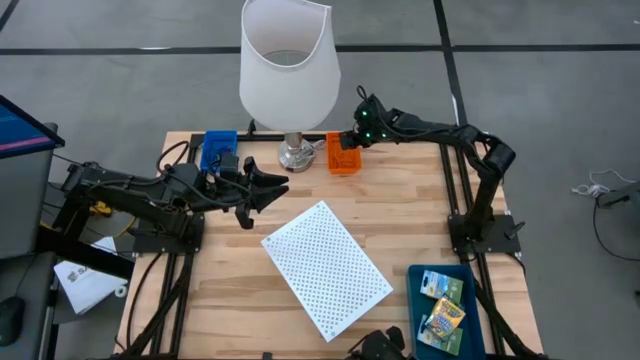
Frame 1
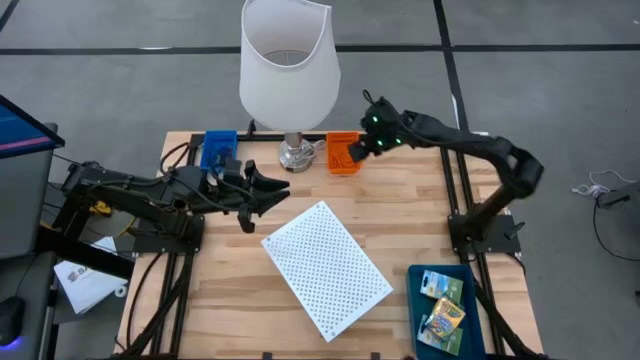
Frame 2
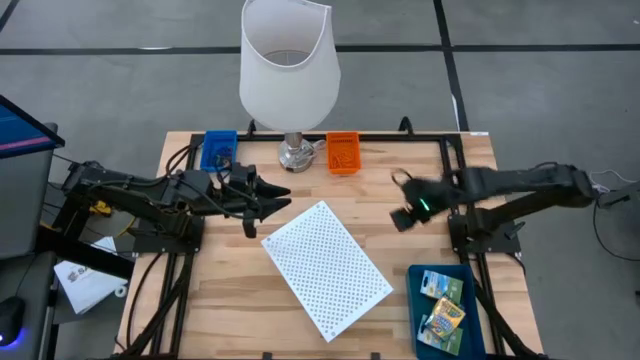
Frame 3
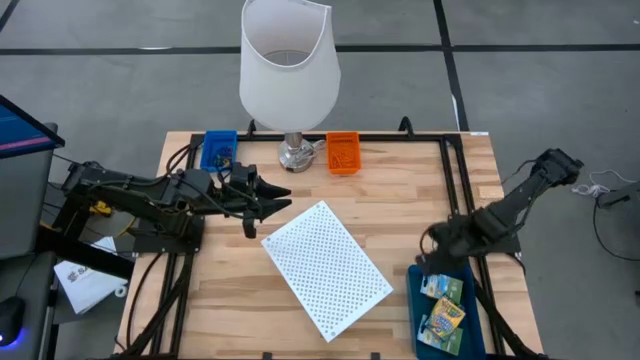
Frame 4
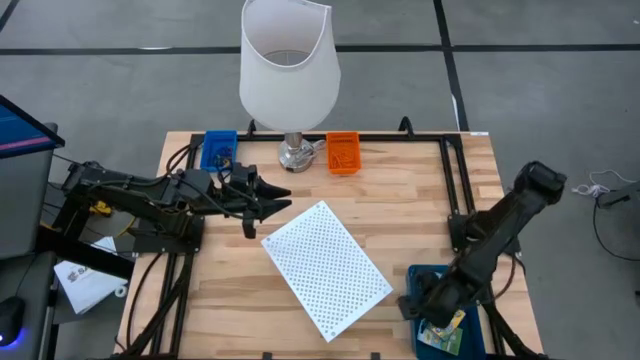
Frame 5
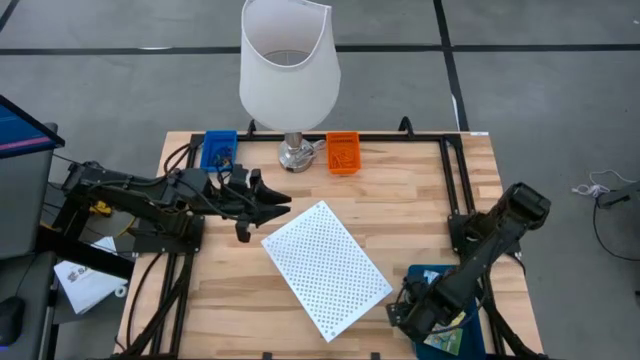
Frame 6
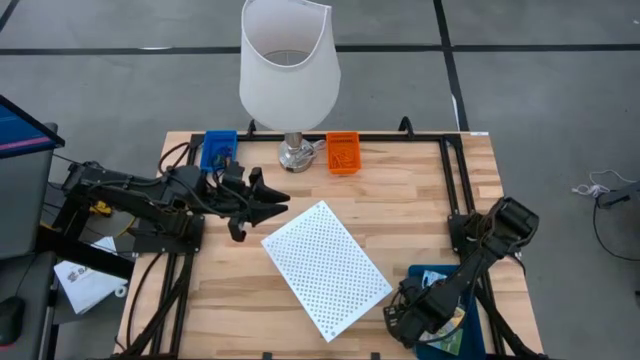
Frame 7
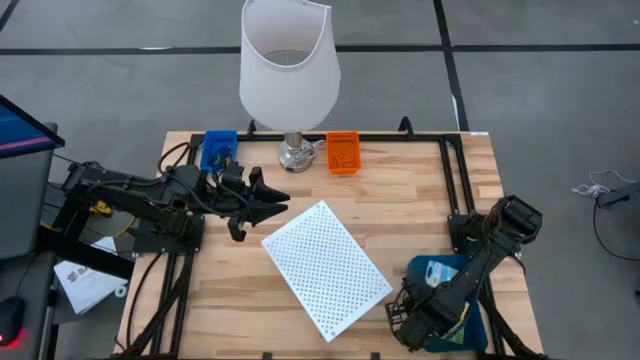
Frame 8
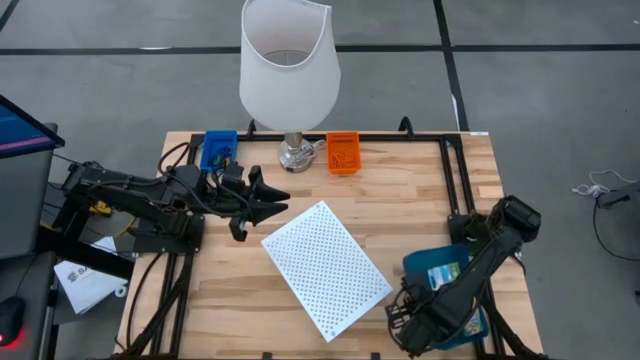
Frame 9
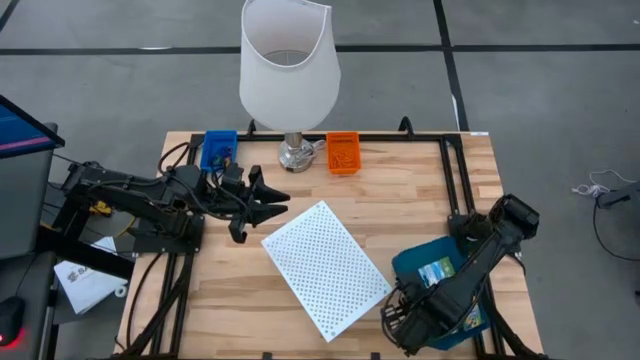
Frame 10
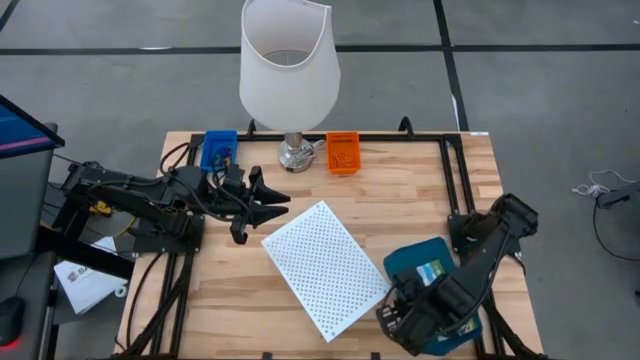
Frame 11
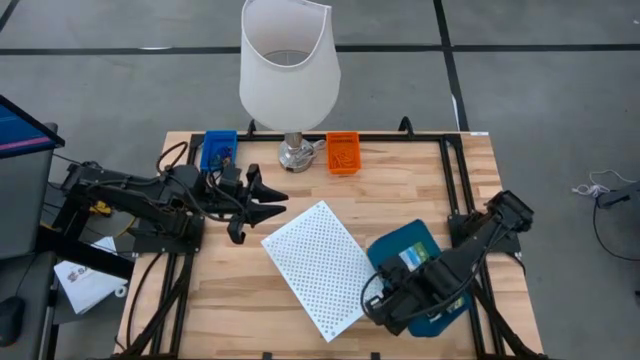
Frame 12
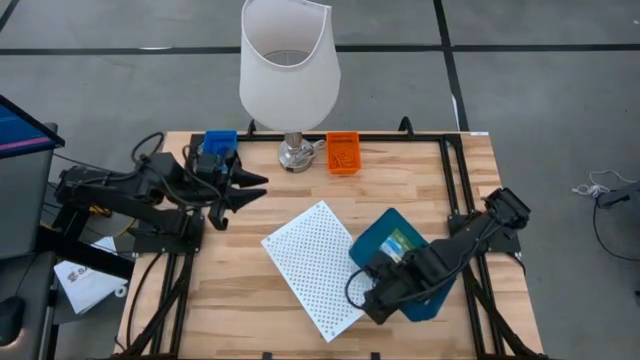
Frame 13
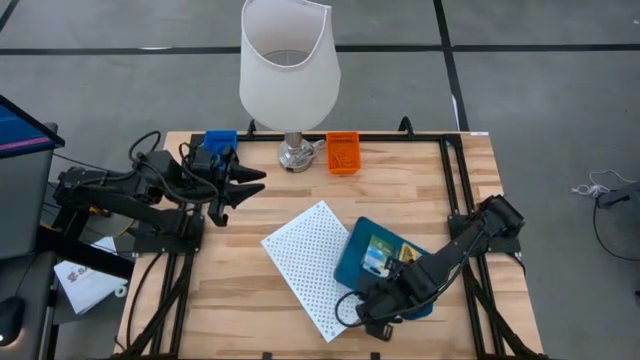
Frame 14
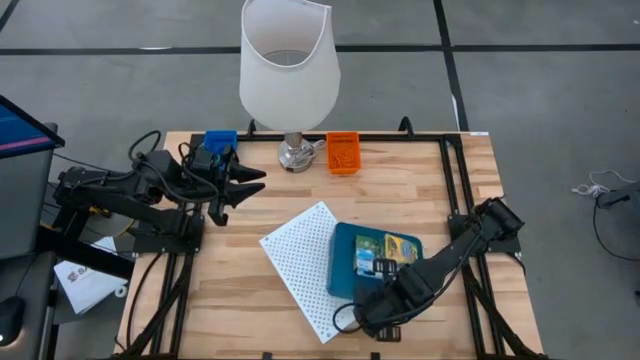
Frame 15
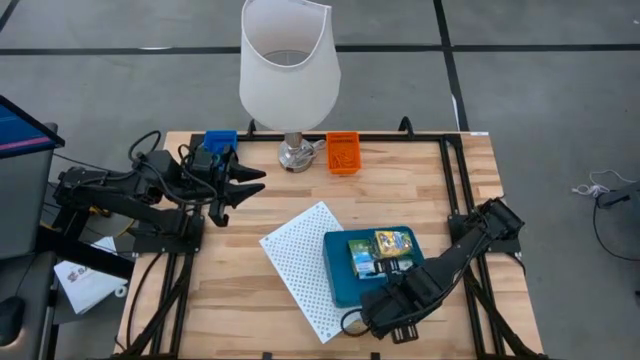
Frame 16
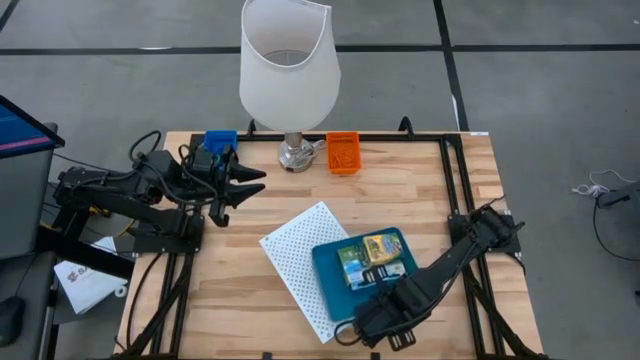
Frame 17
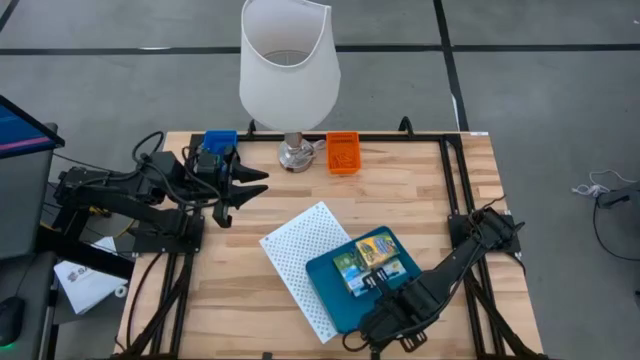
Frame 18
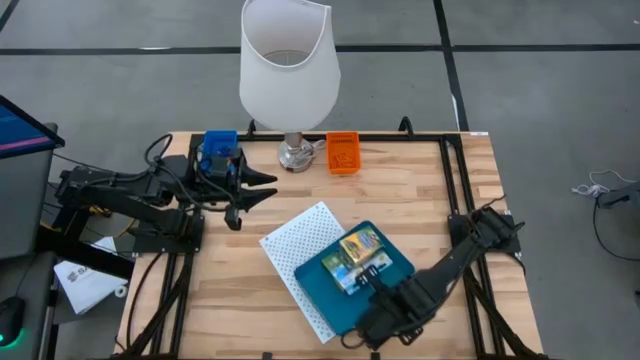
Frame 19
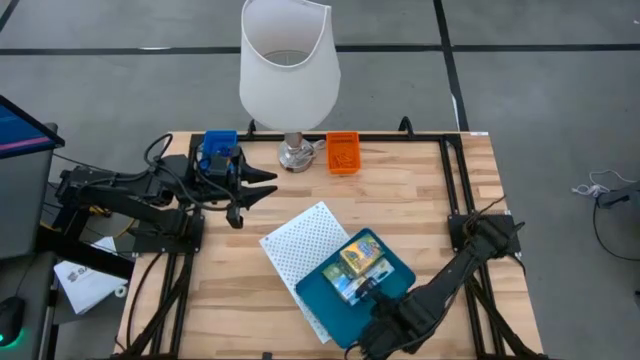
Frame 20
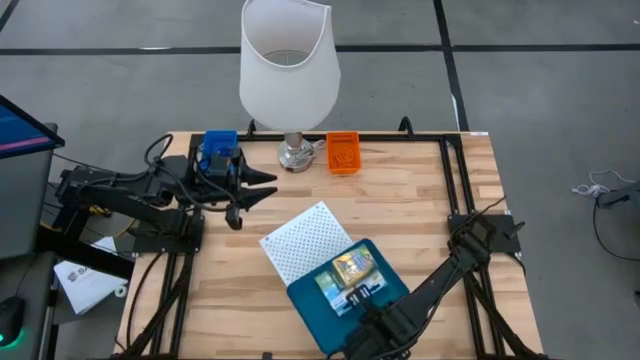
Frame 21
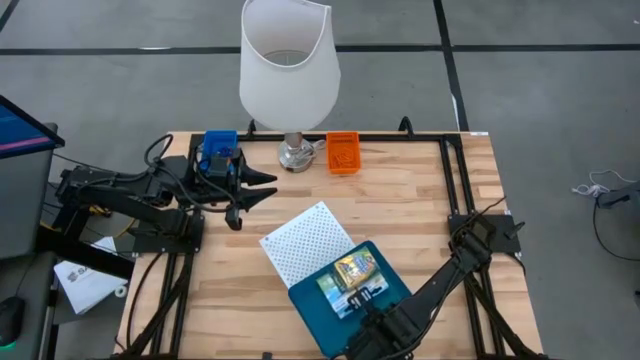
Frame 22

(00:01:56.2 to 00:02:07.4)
Task: Pick & Place Office Desk Supplies
Put the blue bin on the shelf

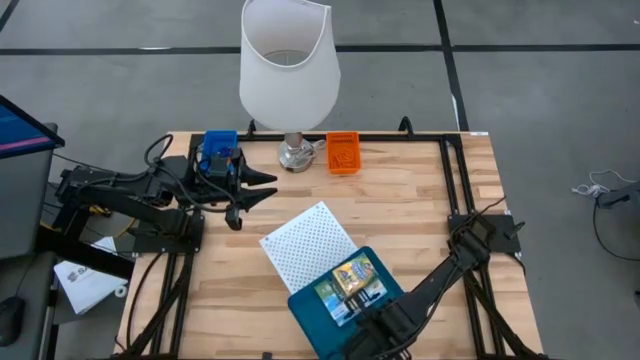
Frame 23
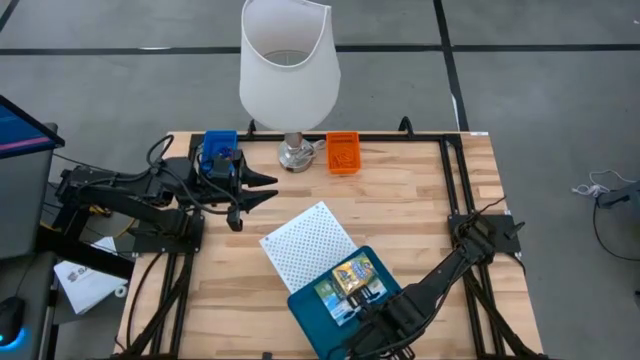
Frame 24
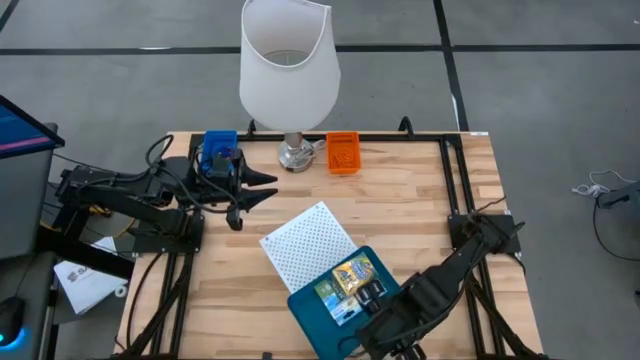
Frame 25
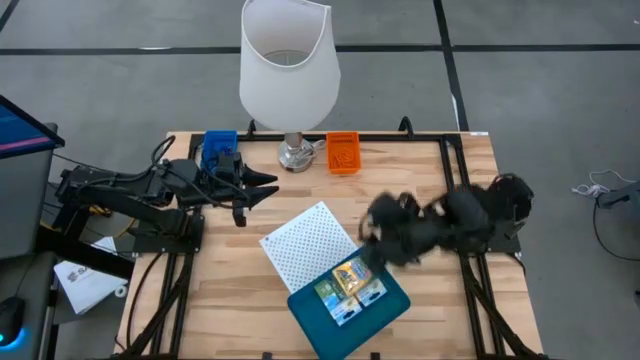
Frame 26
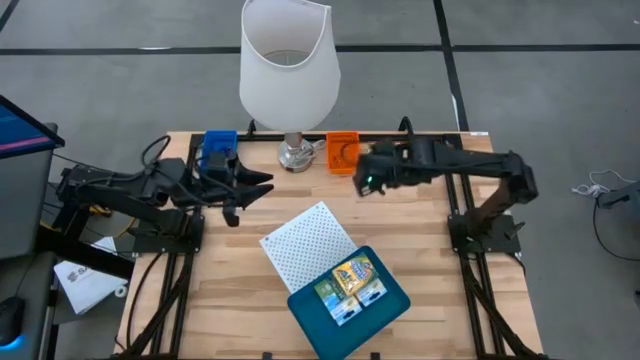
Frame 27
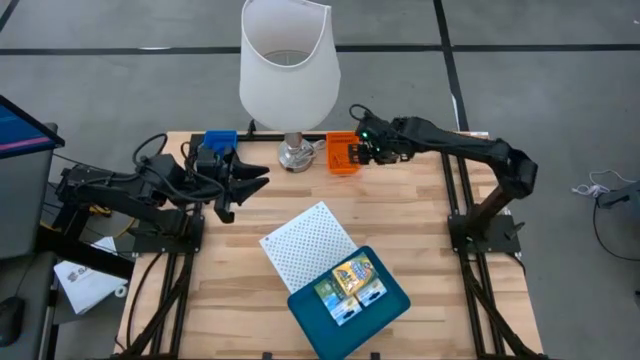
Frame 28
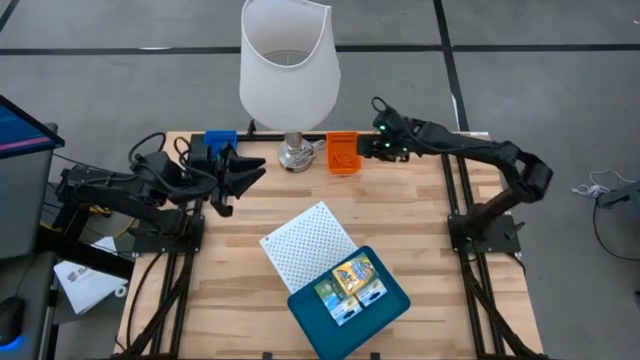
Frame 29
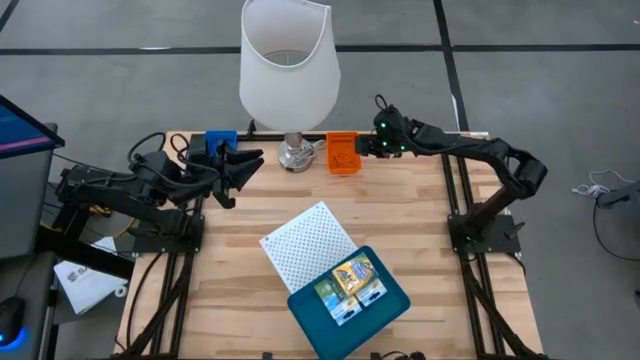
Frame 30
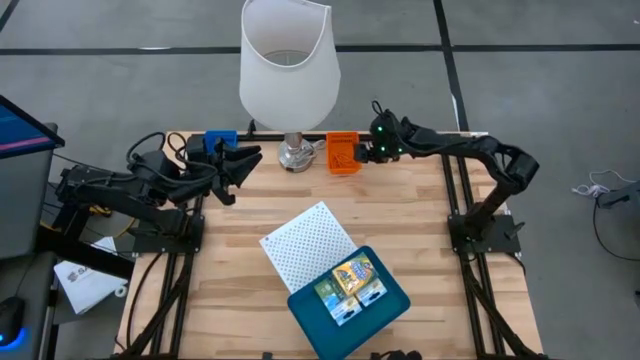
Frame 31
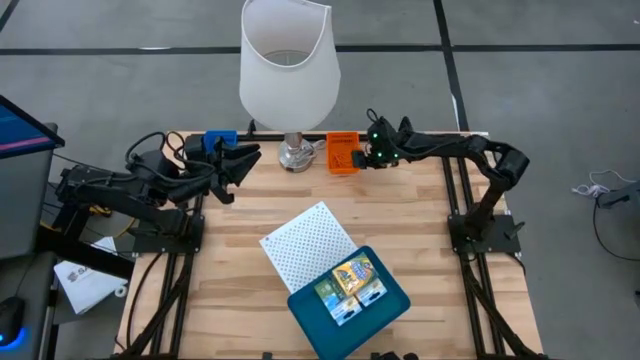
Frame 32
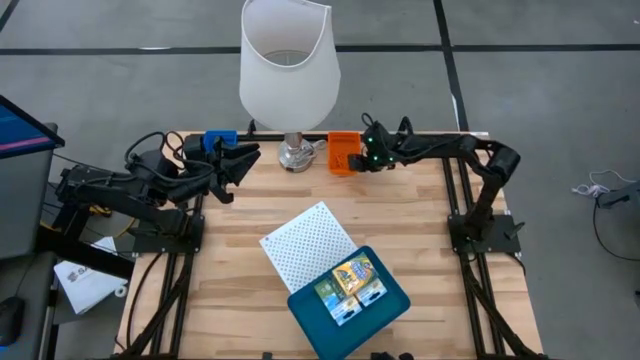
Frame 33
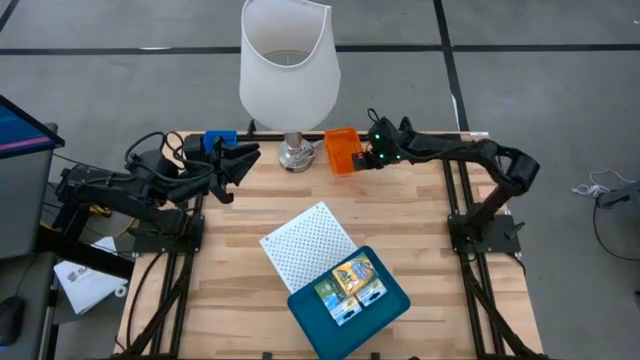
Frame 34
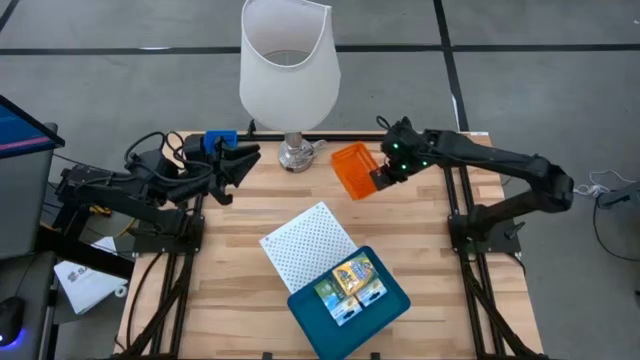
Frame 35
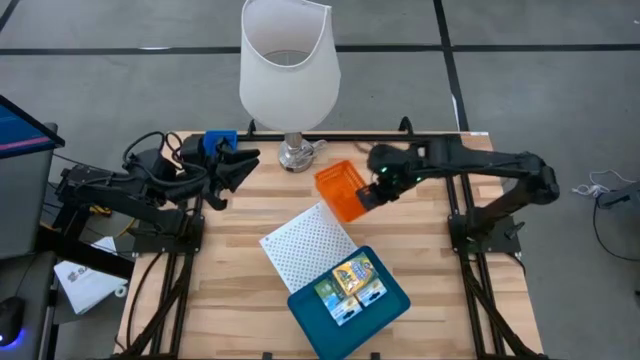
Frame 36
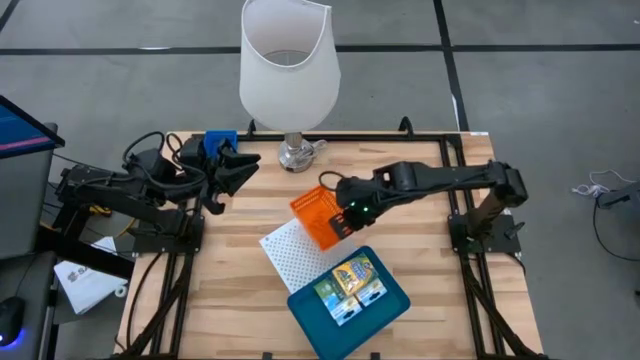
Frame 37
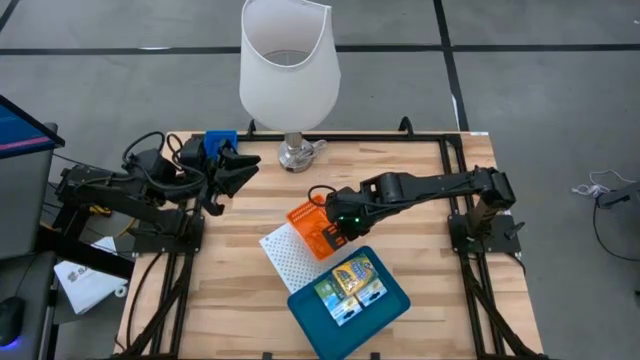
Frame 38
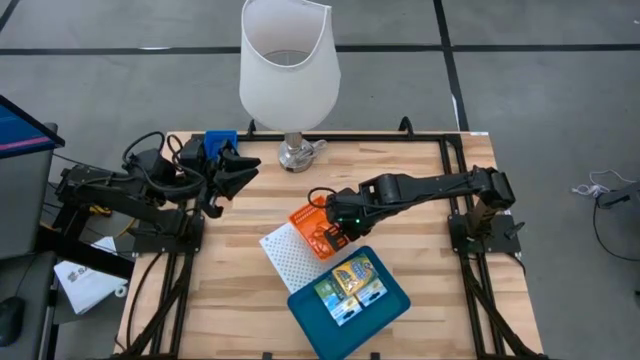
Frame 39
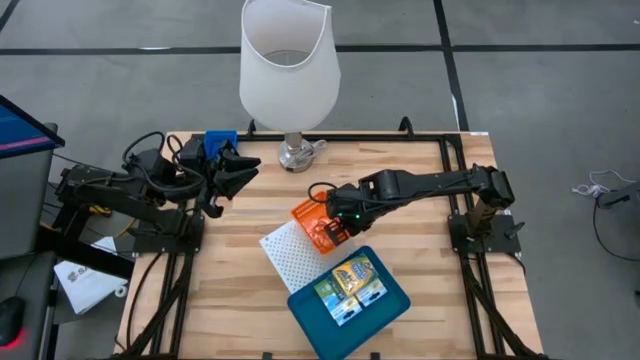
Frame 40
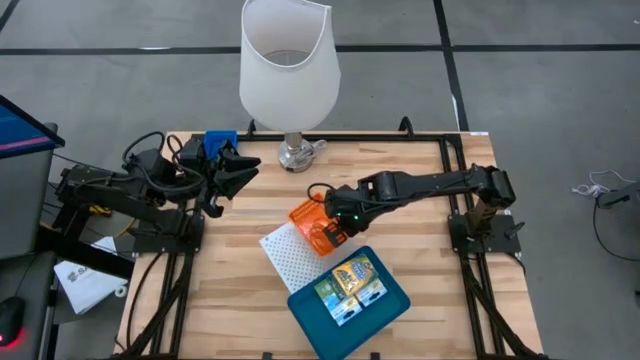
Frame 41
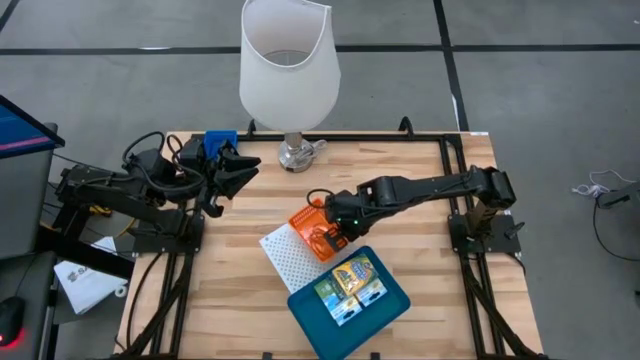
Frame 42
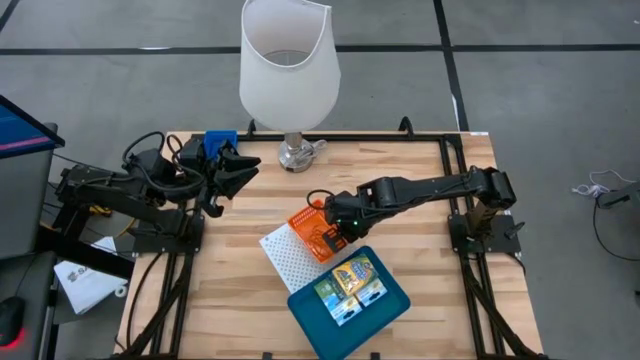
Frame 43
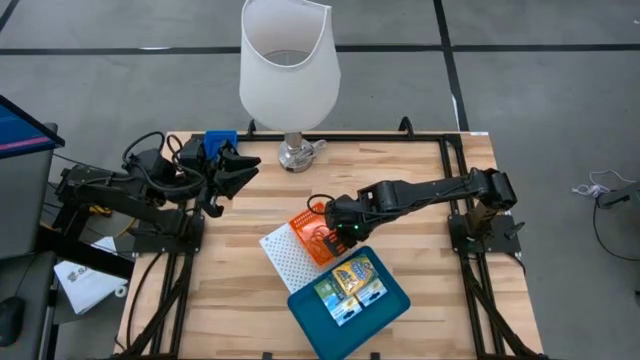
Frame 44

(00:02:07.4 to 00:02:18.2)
Put the orange bin on the shelf
